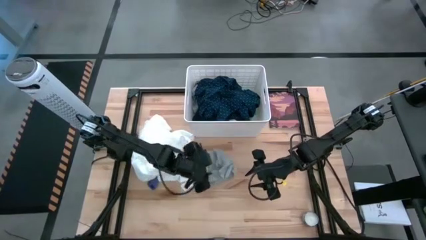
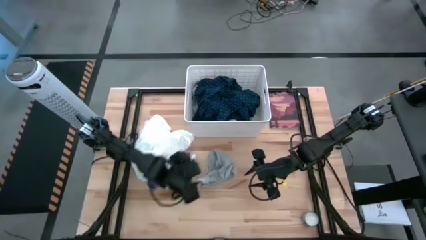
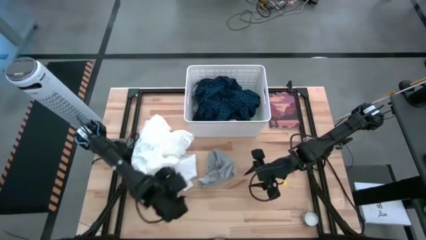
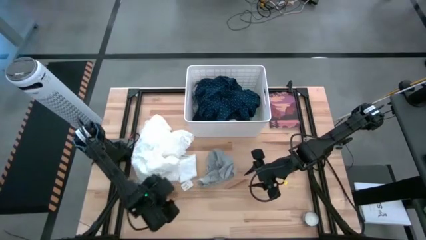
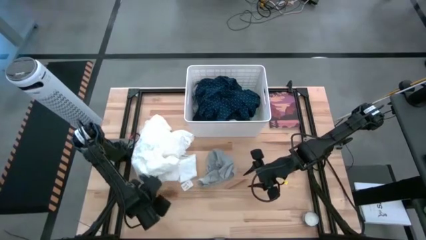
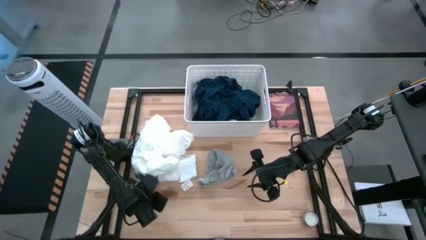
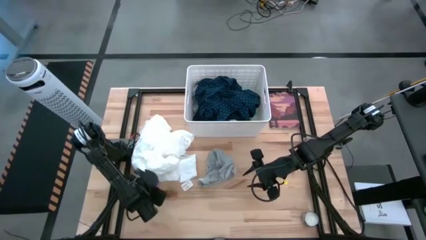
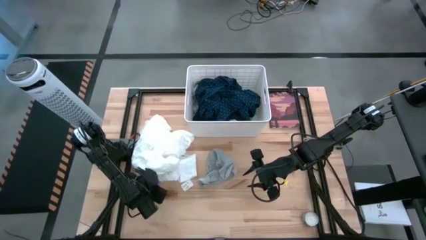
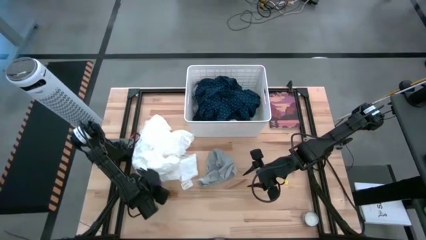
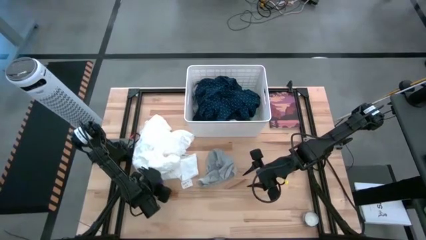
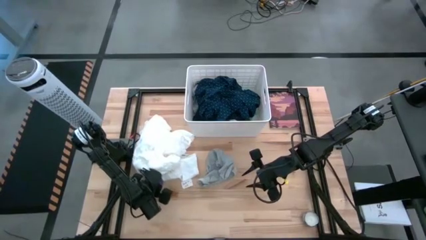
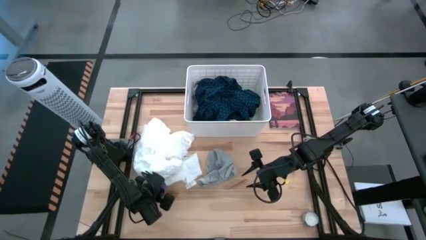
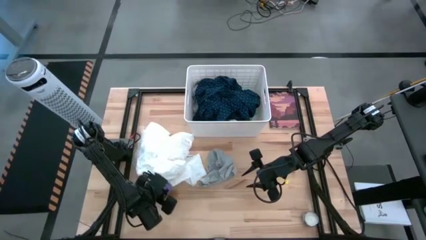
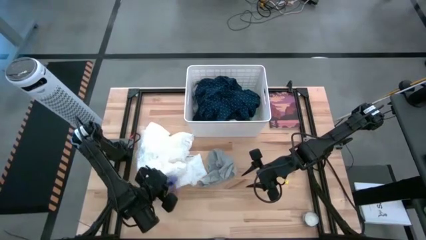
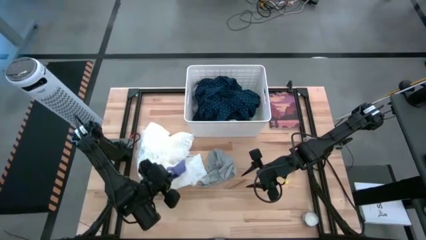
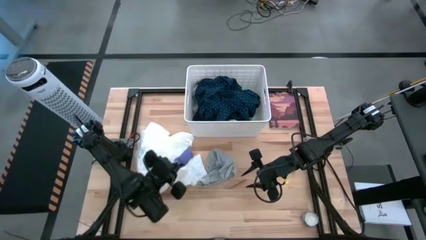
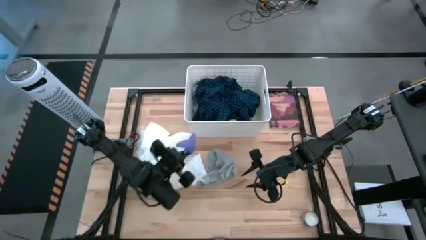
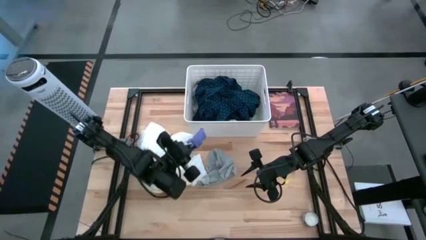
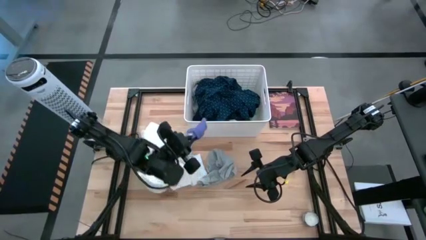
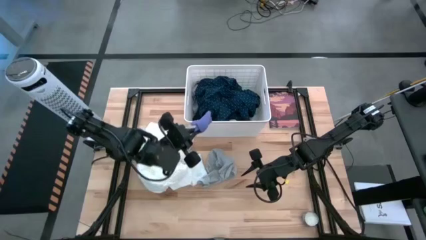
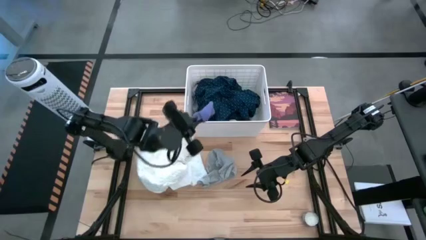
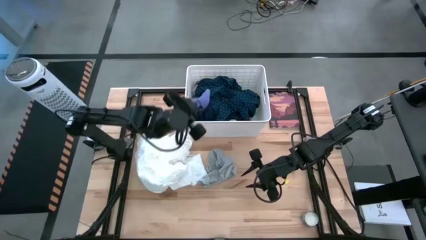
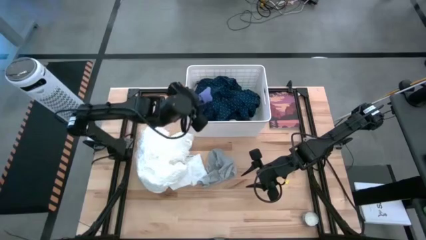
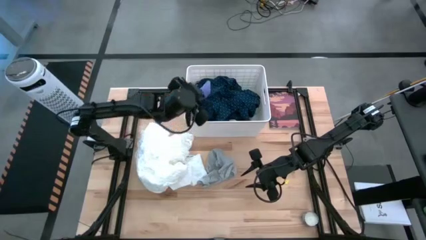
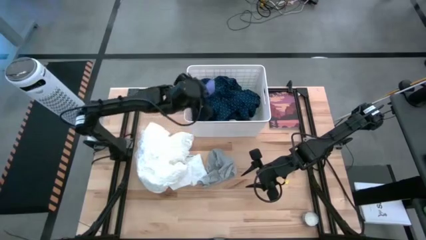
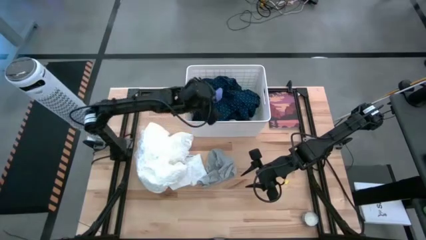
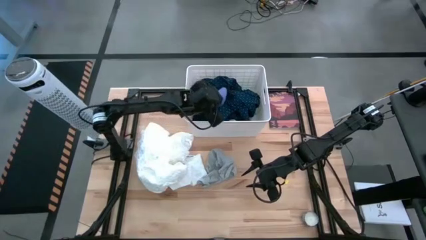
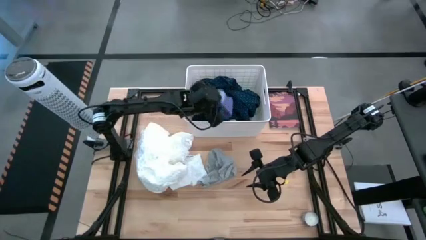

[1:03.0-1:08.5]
Task: Sort clothes
Put the light blue sock from the middle left into the laundry bin

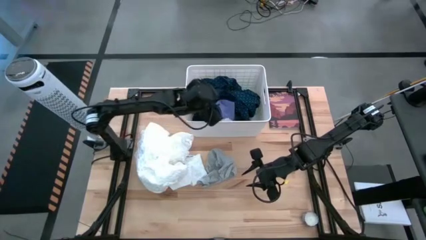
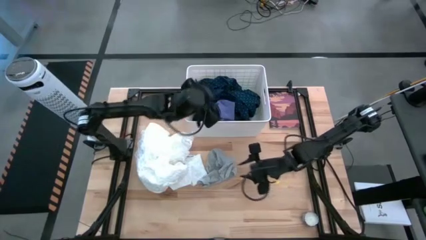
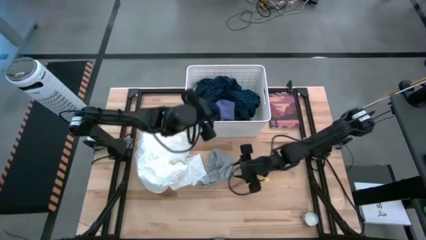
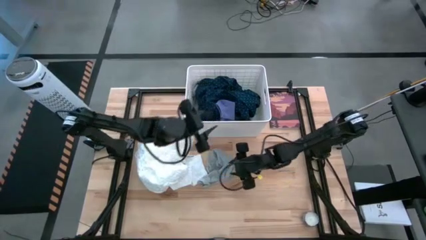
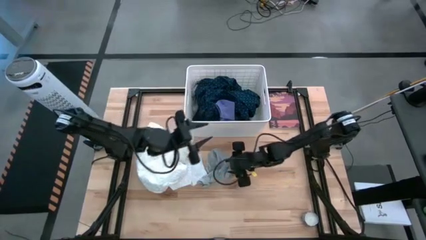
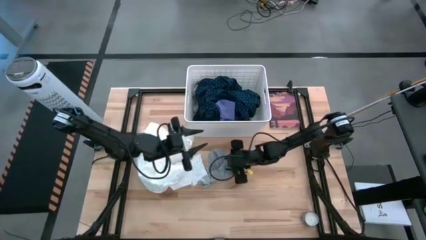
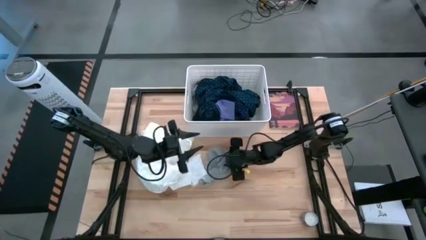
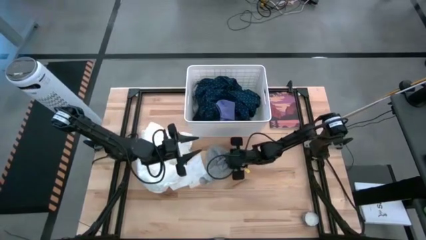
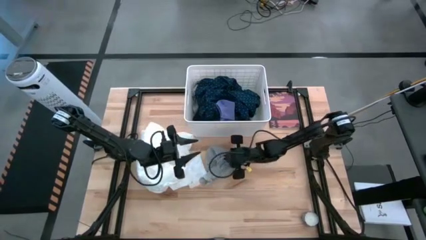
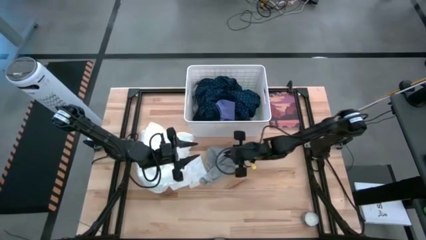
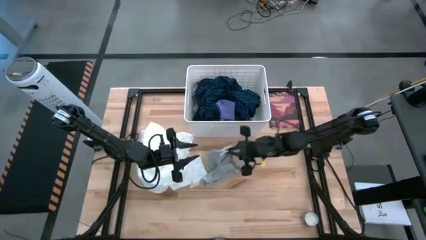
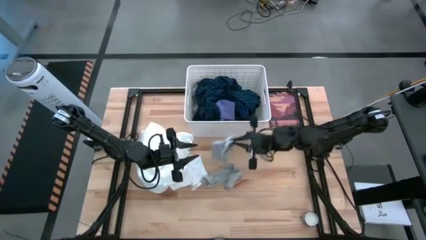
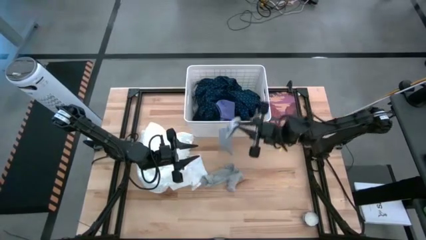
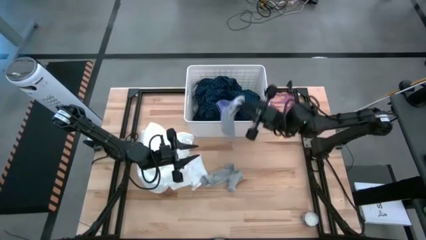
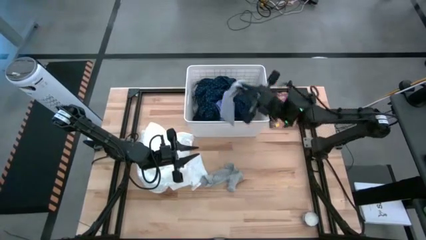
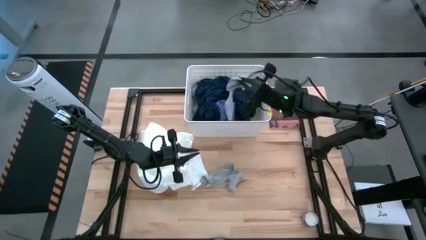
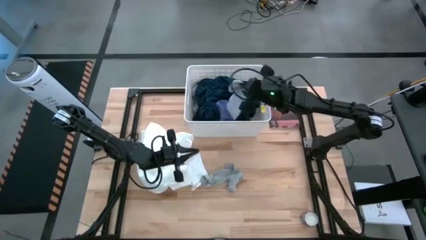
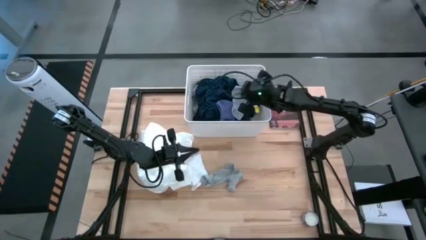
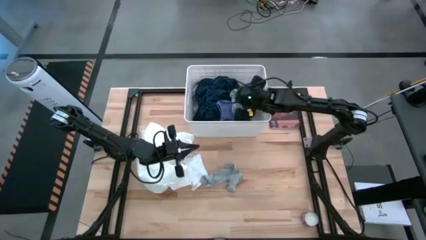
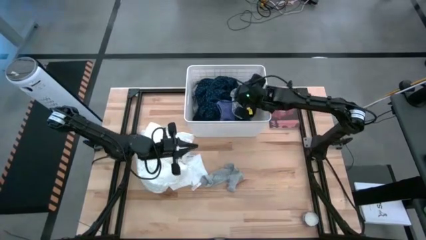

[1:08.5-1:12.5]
Put the gray sock from the top into the laundry bin

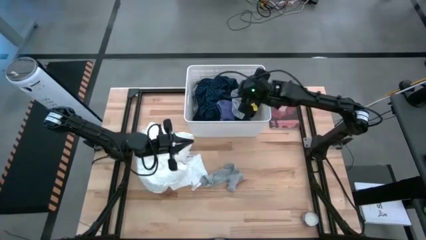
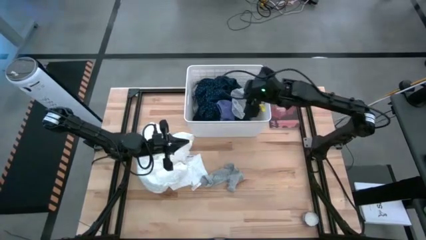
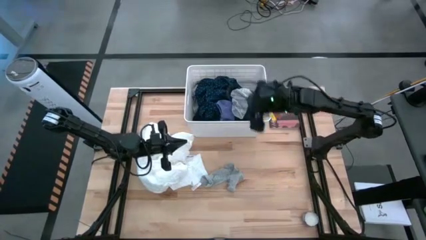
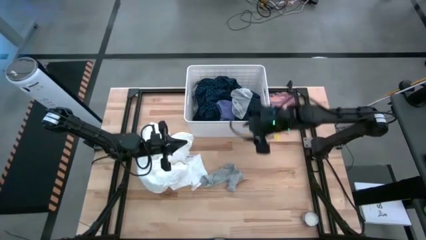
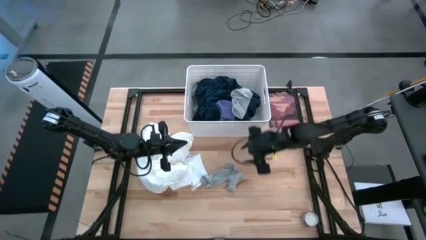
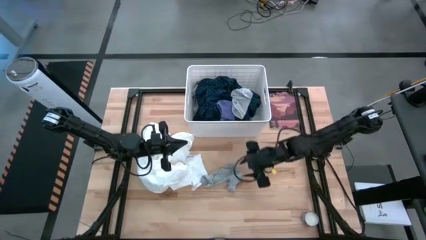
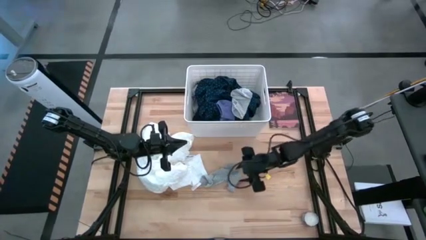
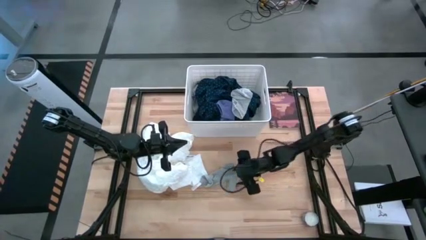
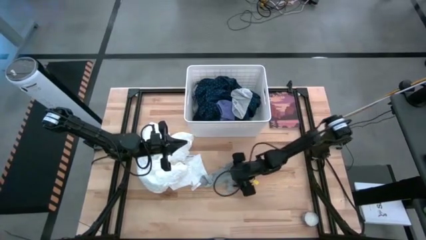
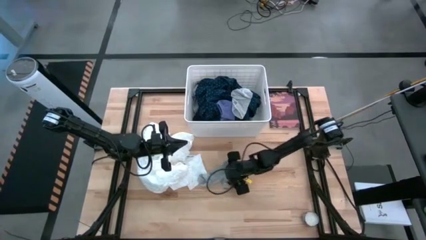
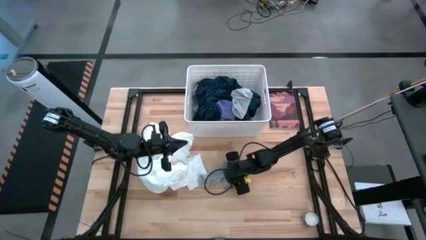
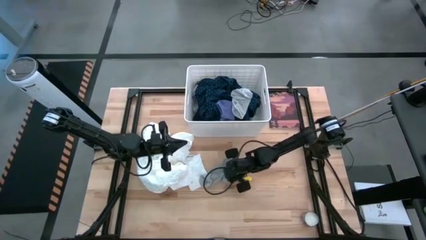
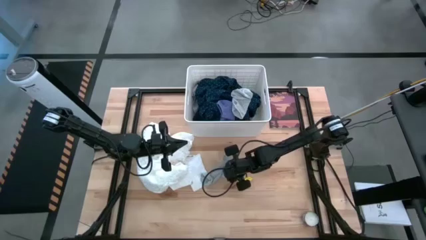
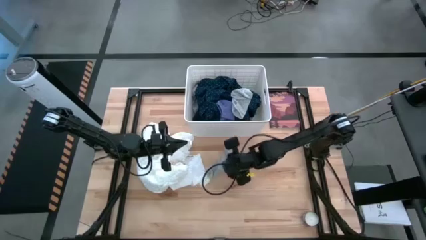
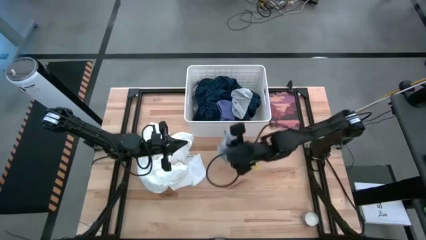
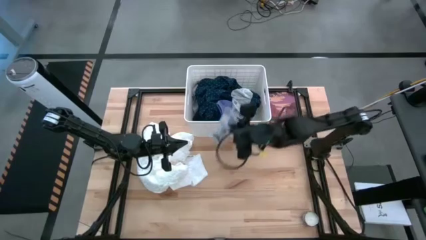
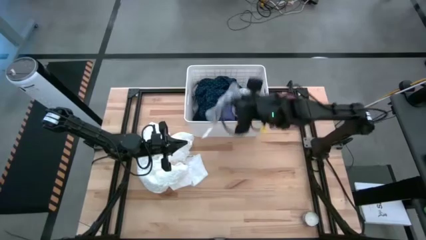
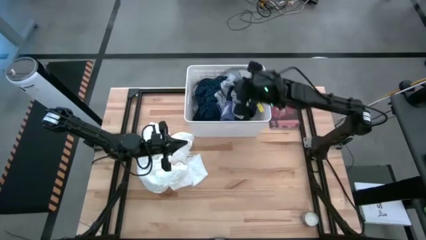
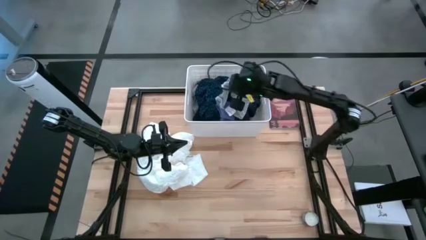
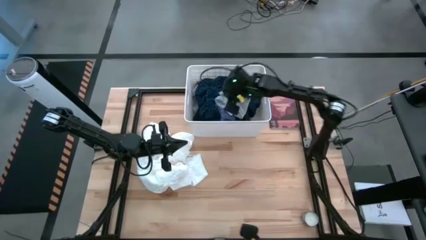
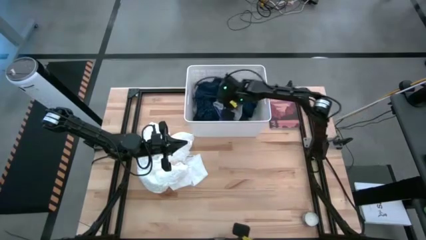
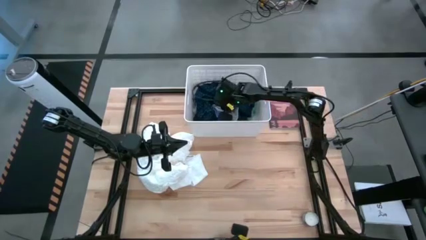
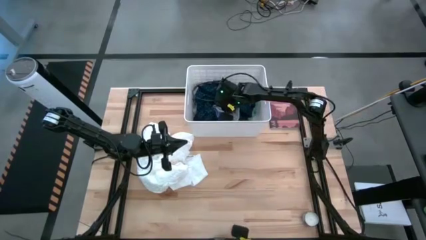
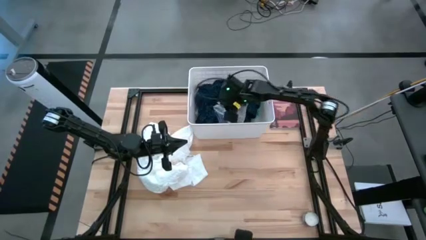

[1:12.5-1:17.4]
Put the gray sock into the laundry bin

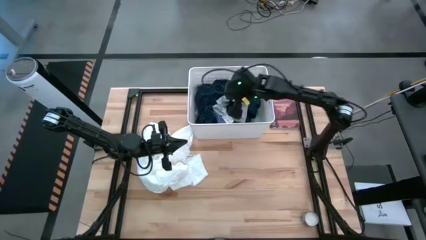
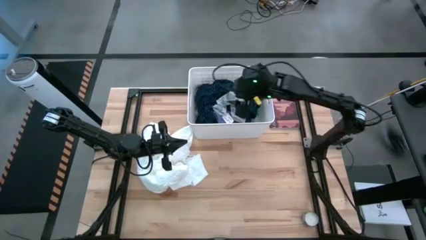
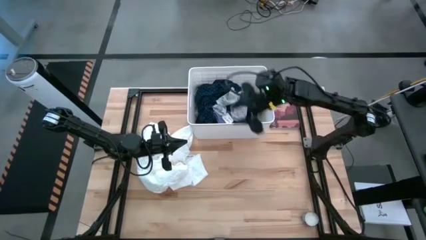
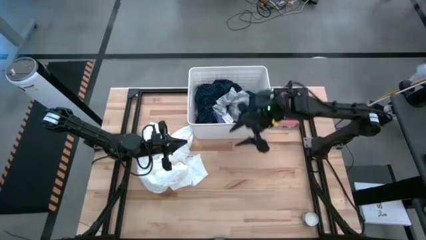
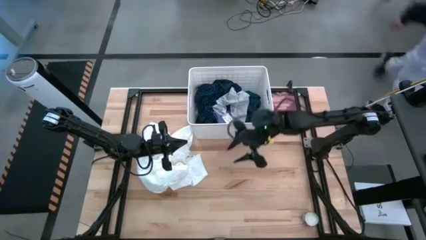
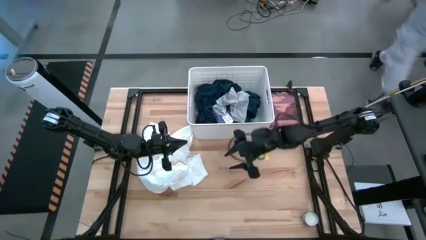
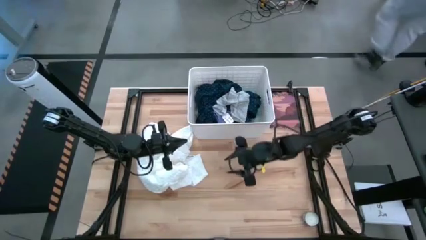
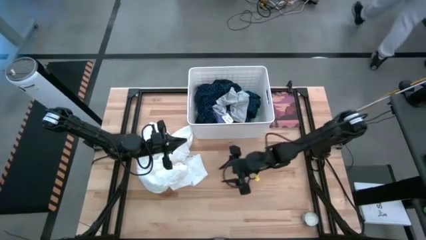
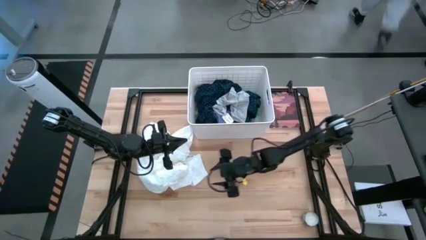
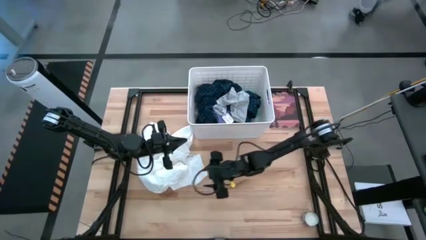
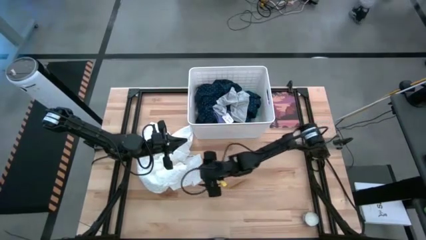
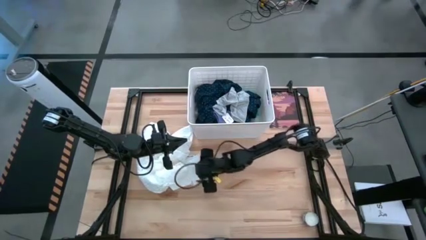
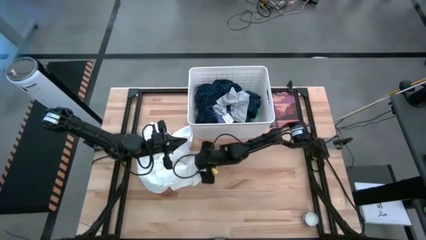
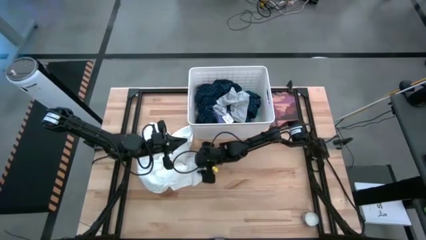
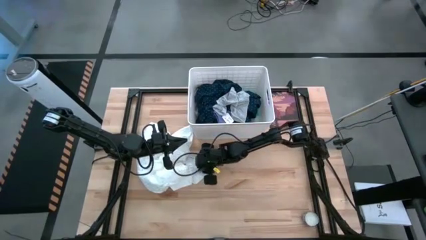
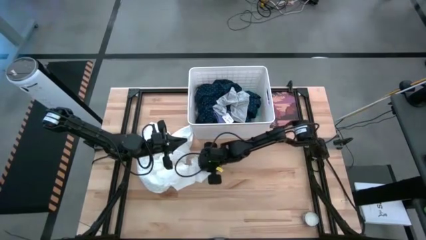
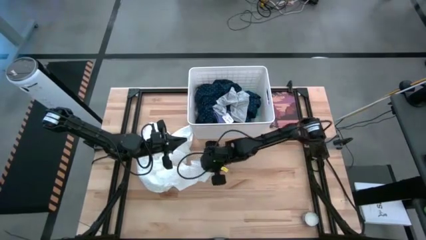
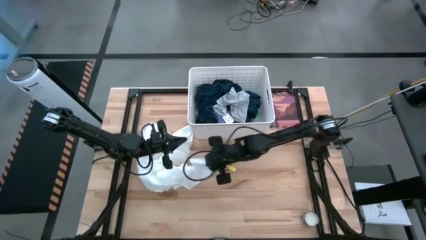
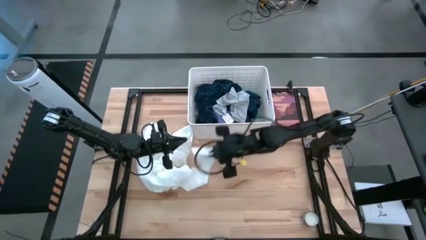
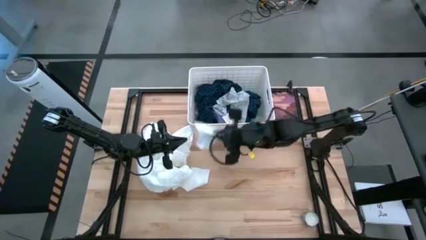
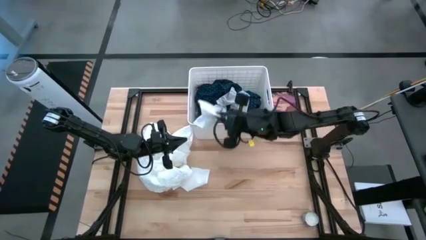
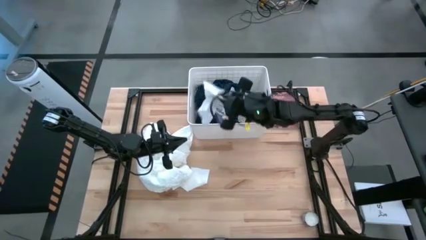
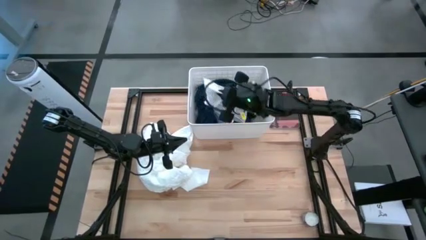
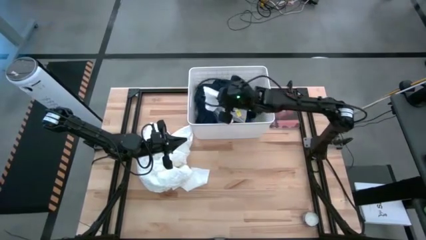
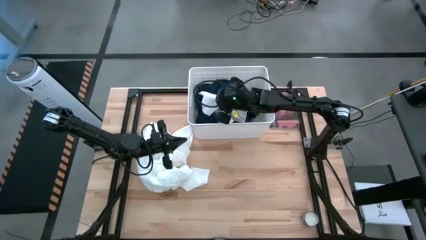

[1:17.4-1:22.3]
Put the right white sock into the laundry bin
